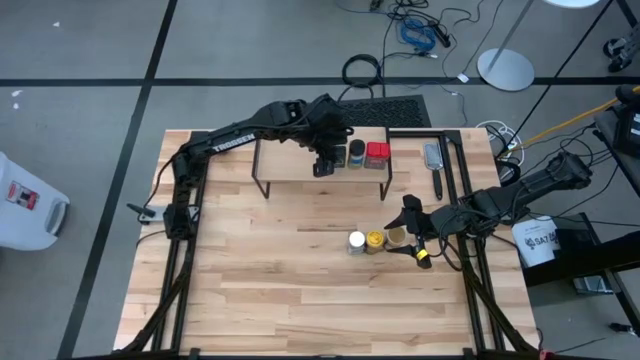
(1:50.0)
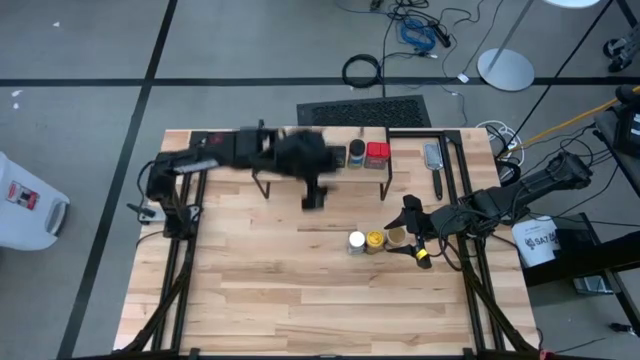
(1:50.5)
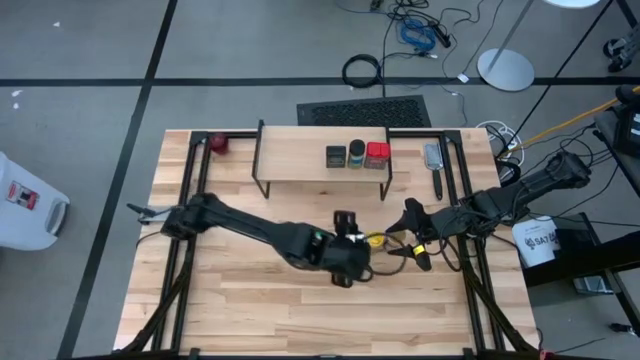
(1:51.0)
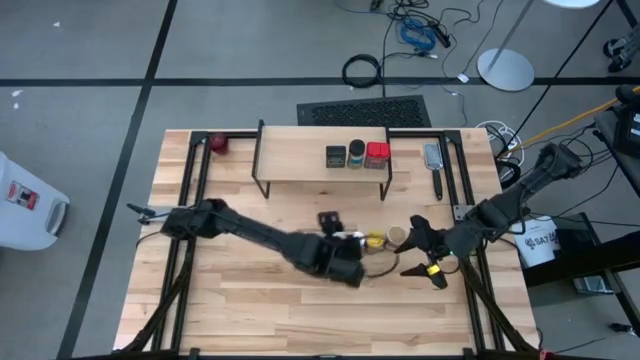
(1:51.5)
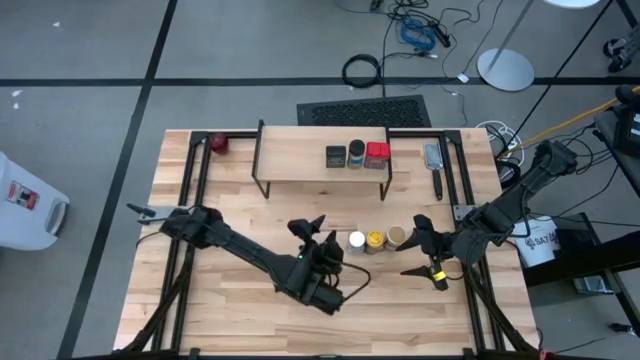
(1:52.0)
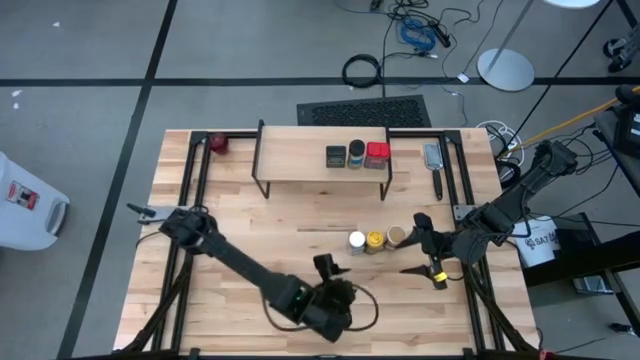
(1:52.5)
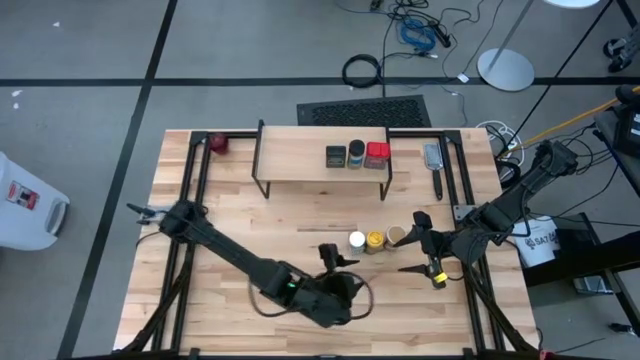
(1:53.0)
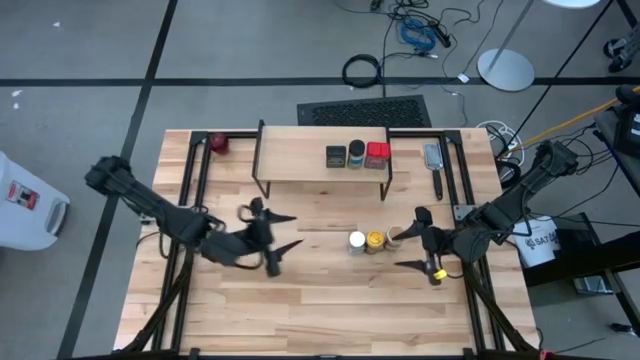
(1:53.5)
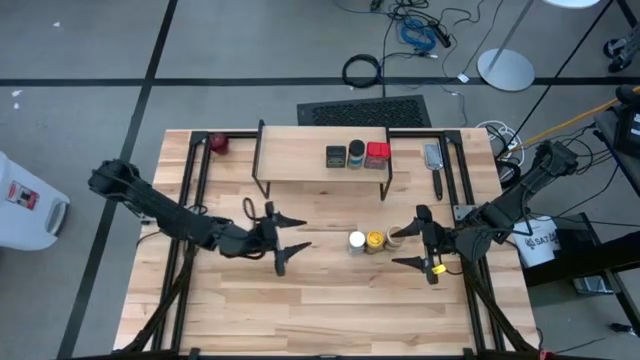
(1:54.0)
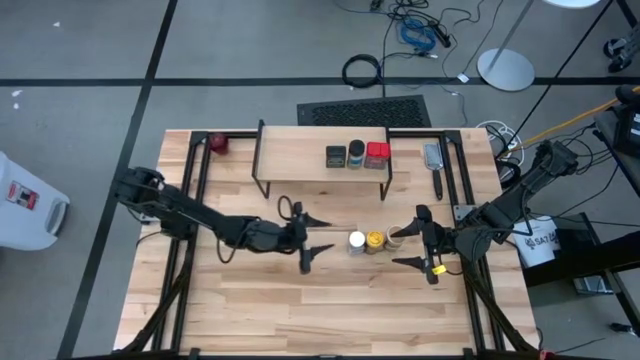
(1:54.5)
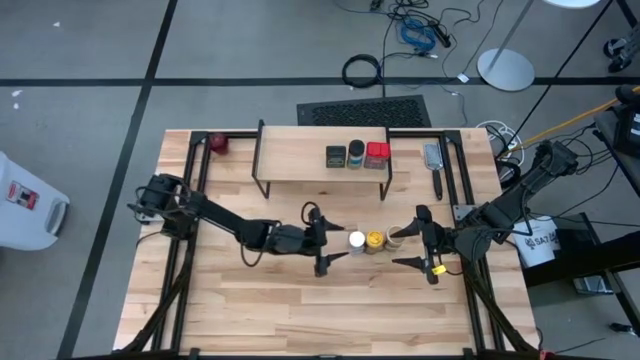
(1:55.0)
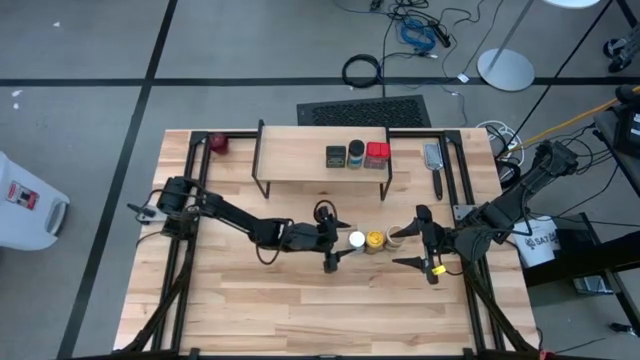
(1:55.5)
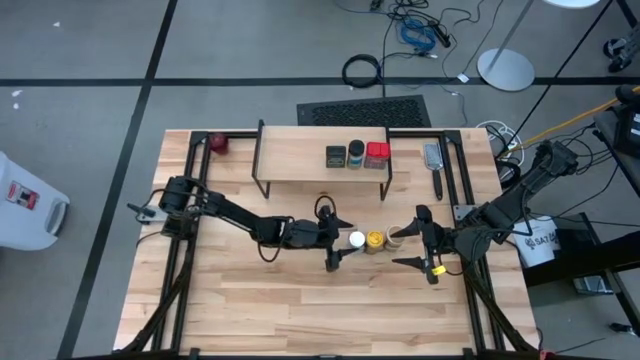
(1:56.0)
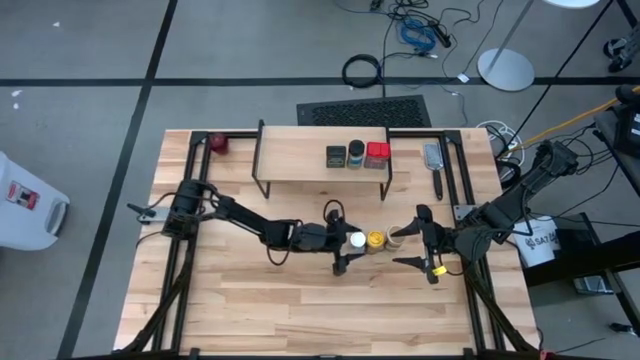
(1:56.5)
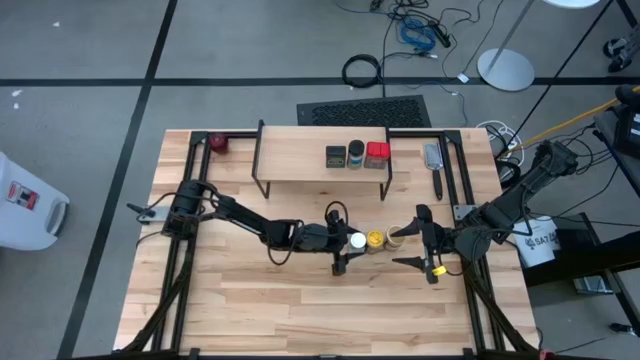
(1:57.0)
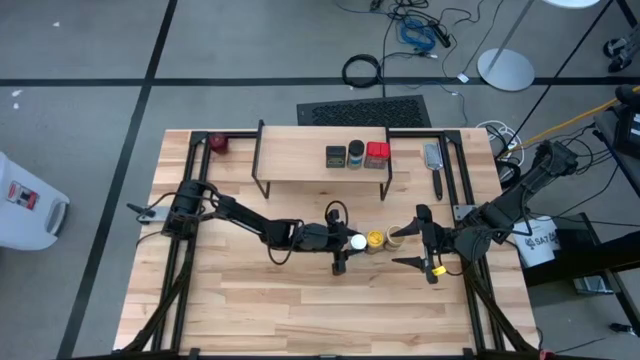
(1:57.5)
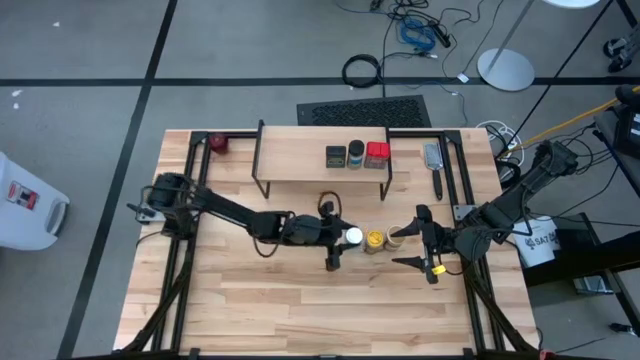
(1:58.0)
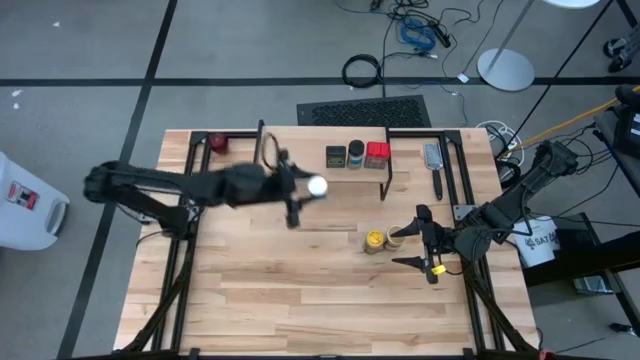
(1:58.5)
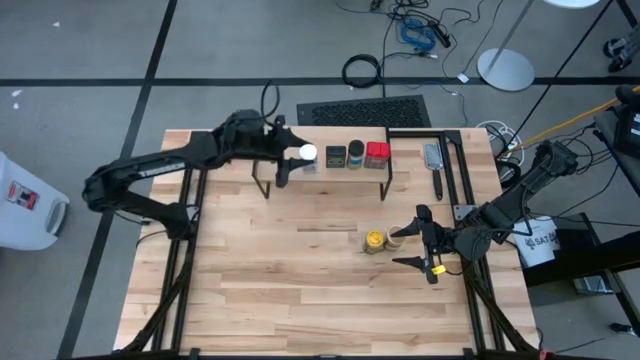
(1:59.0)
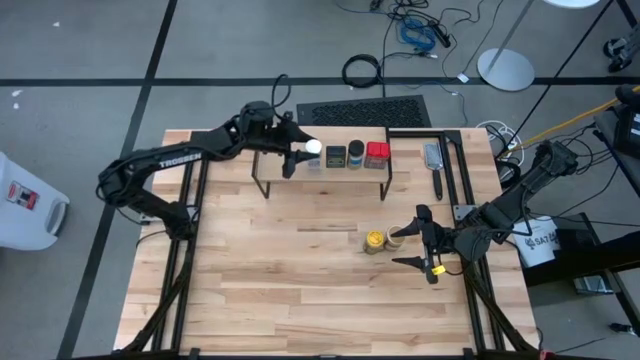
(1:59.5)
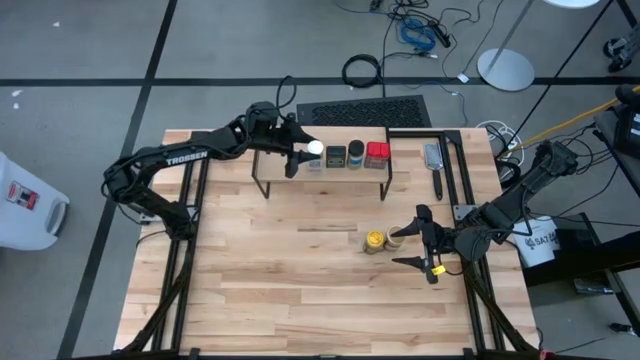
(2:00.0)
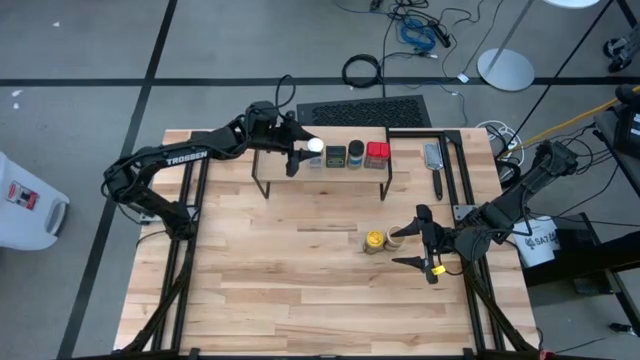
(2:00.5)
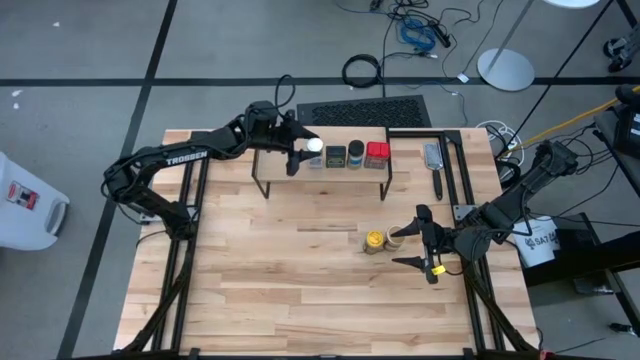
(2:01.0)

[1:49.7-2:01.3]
Task: Shelf spices
Put the white seasoning bottle on the shelf

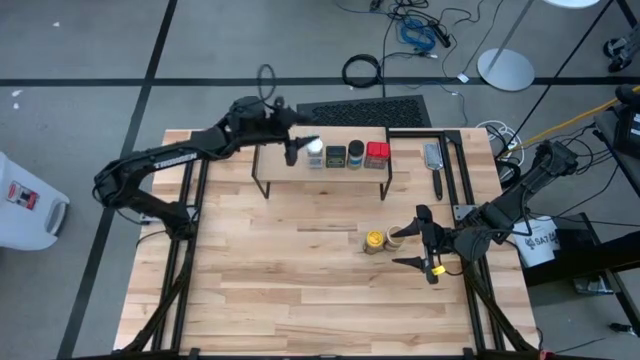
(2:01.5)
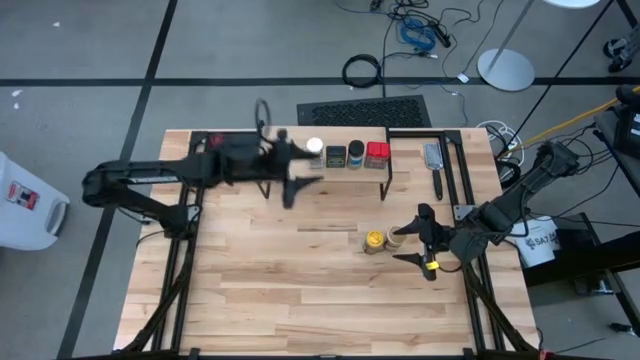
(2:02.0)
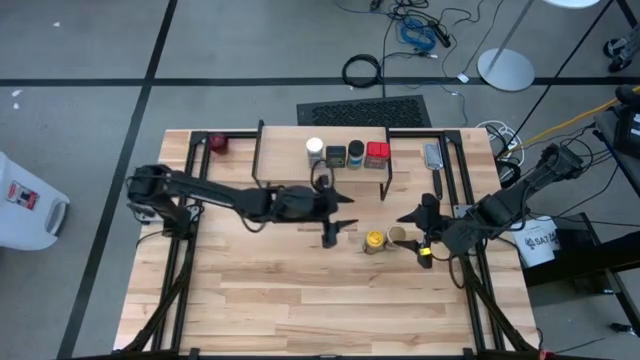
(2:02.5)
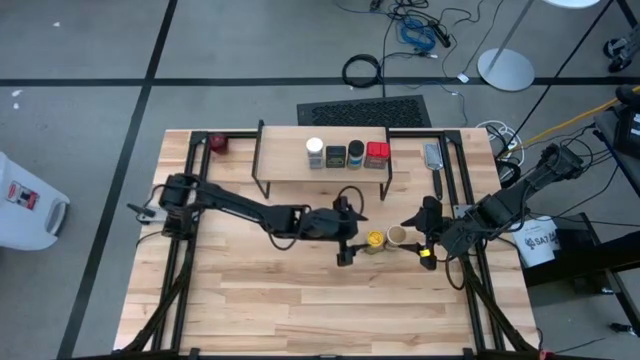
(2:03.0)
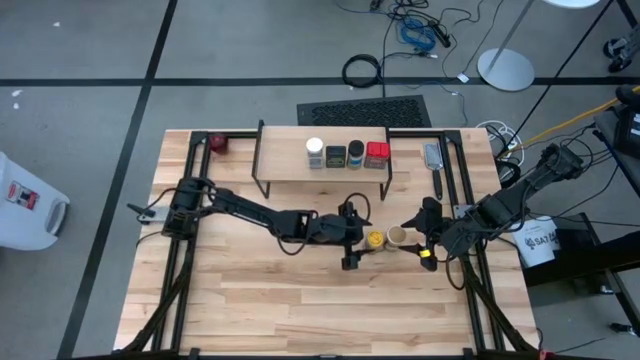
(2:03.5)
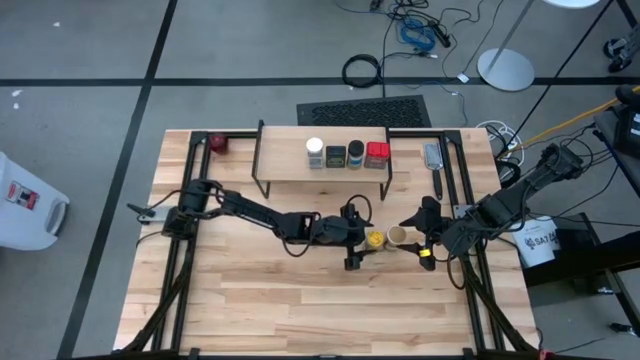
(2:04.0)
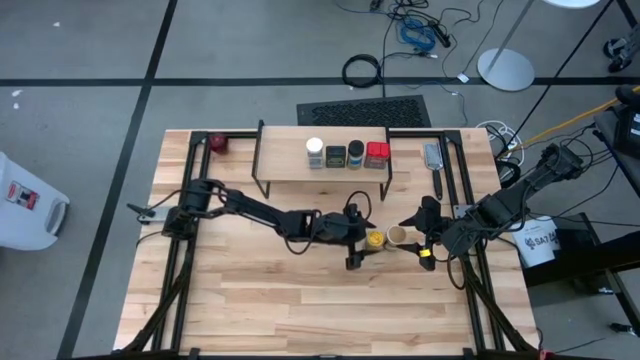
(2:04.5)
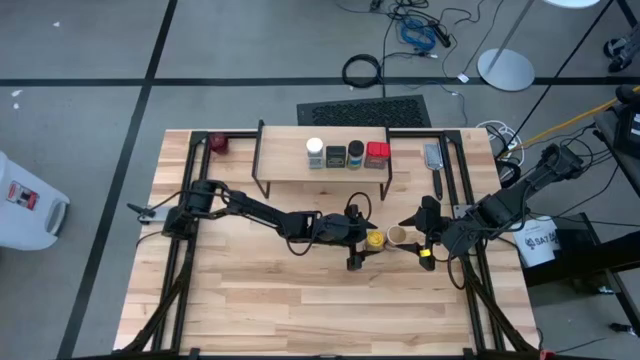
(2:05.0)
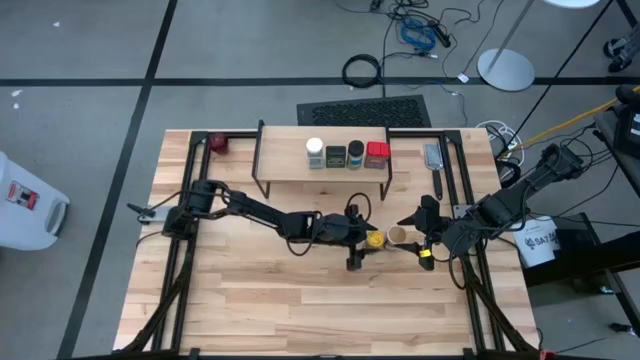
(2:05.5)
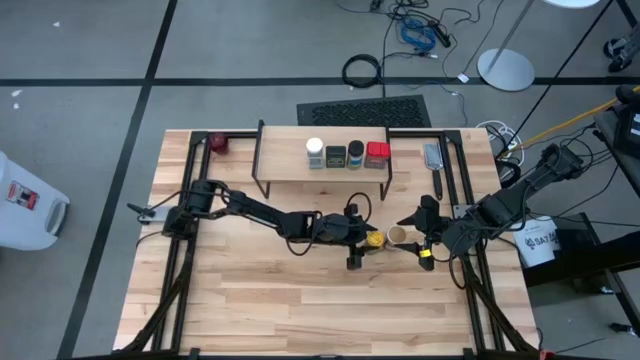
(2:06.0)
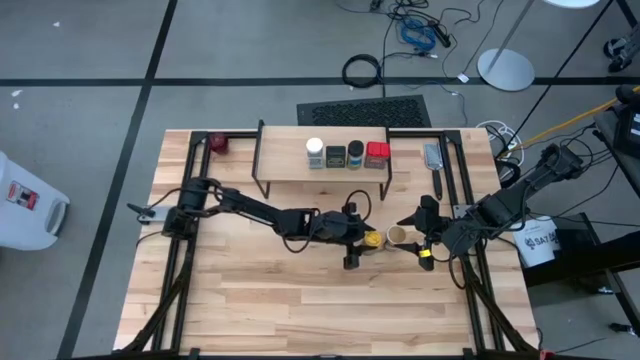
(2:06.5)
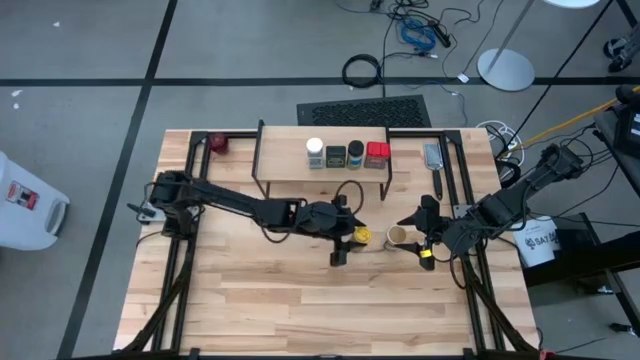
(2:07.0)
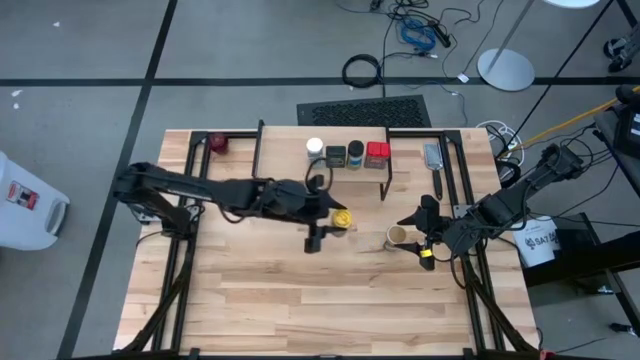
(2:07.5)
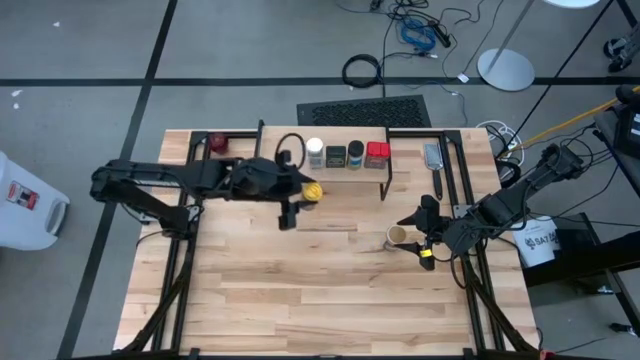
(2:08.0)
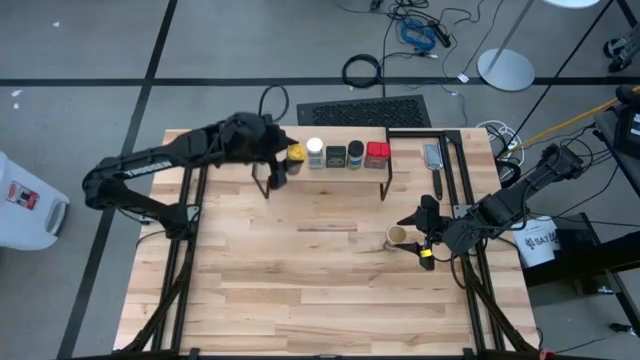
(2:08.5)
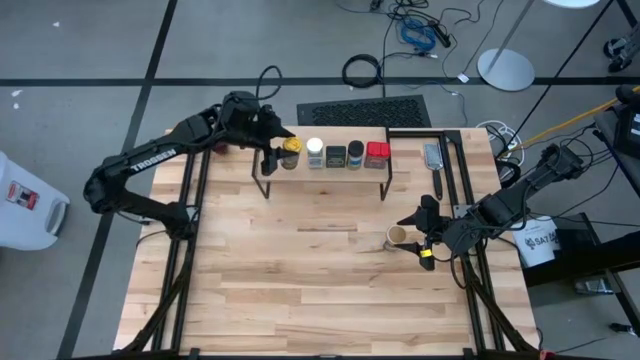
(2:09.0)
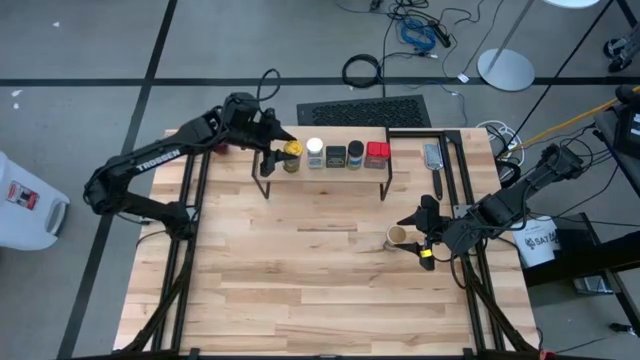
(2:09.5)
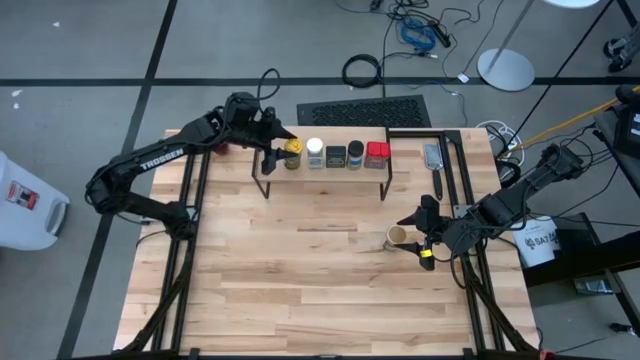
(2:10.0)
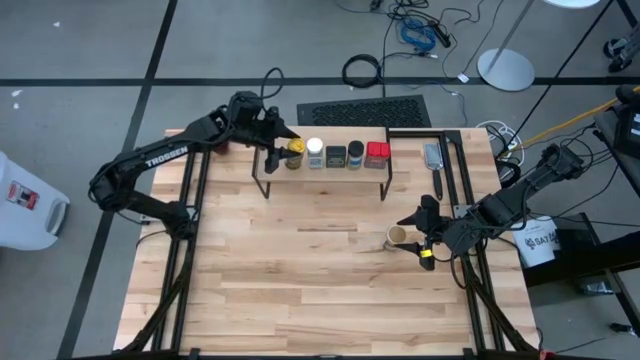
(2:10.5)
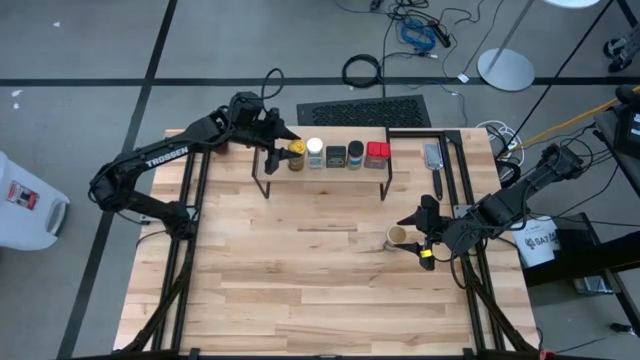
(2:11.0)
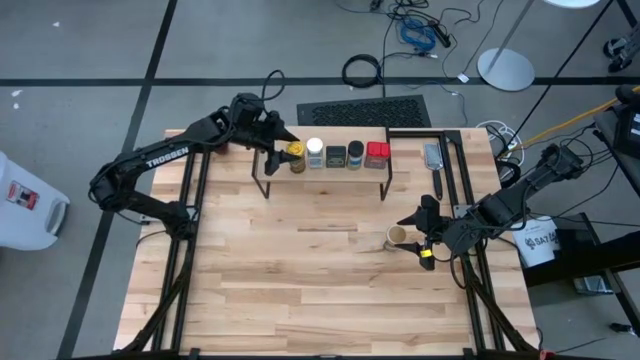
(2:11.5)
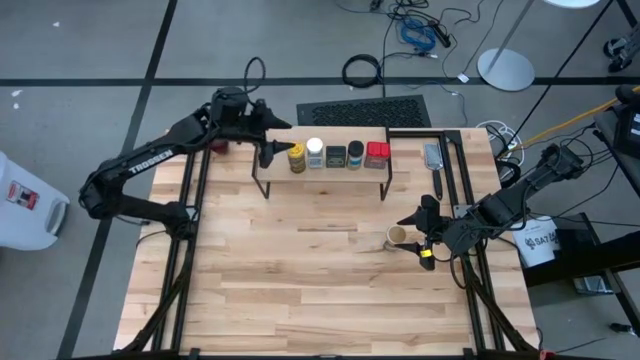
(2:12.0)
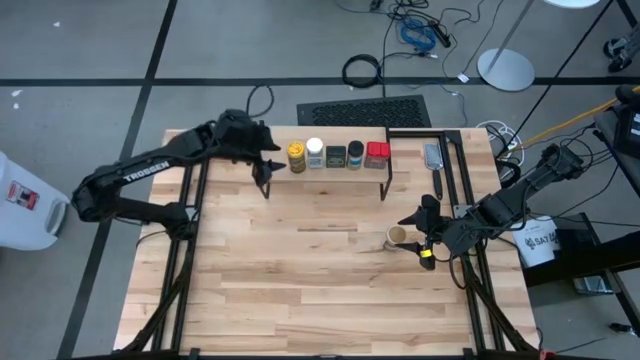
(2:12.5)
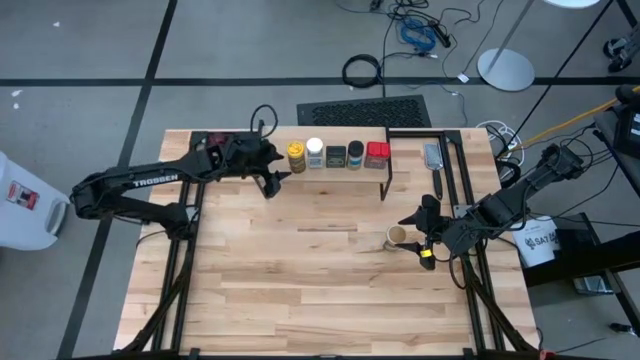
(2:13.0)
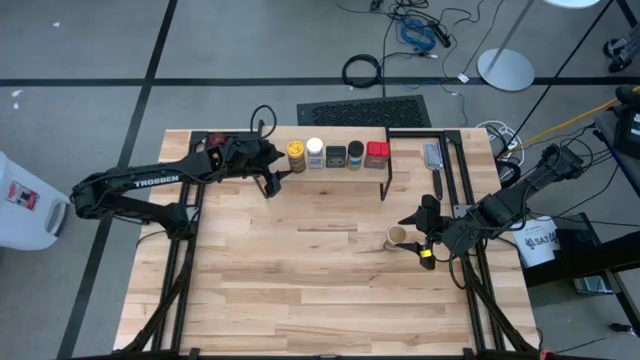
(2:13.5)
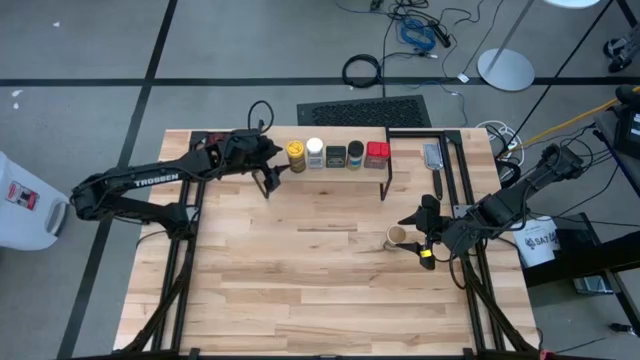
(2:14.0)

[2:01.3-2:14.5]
Put the yellow seasoning bottle on the shelf
